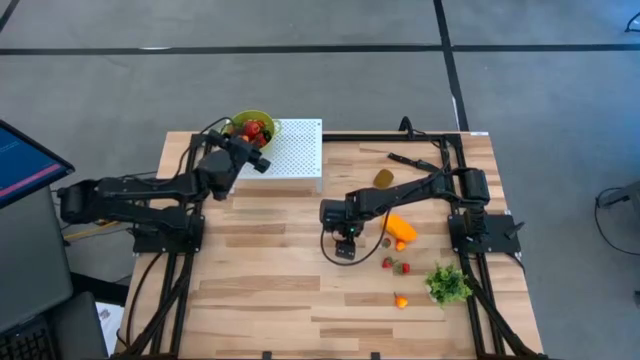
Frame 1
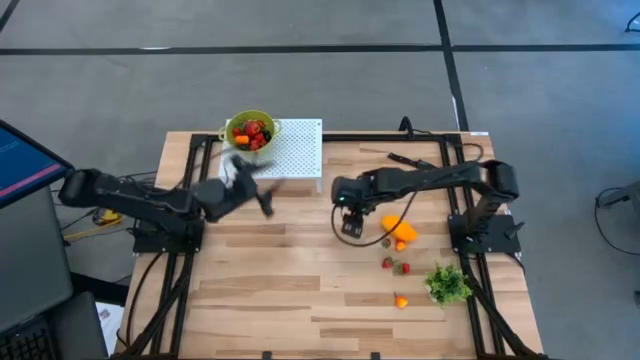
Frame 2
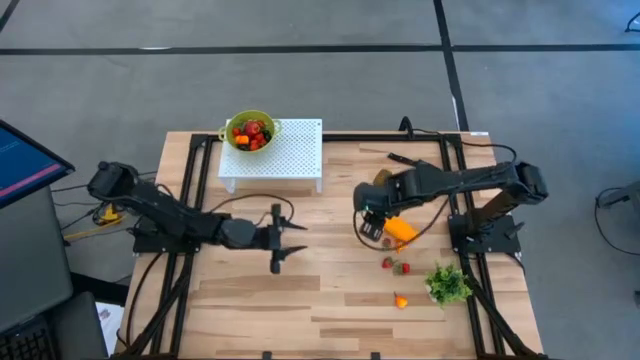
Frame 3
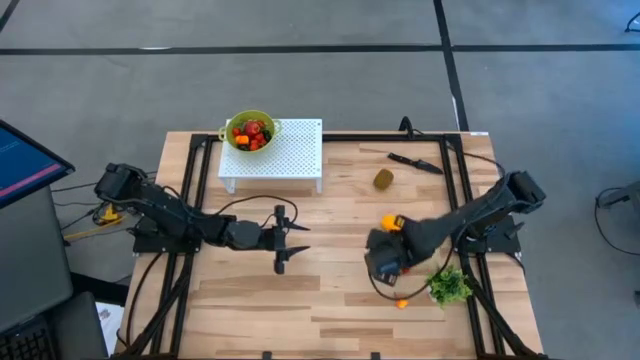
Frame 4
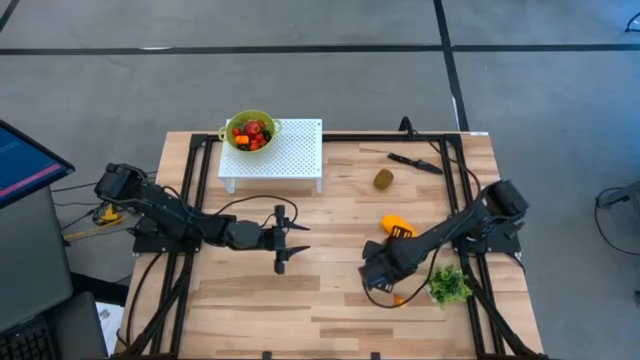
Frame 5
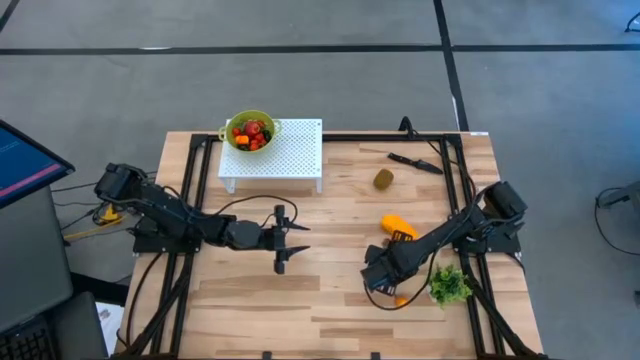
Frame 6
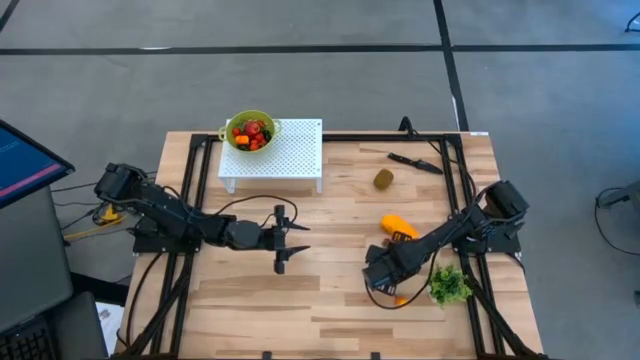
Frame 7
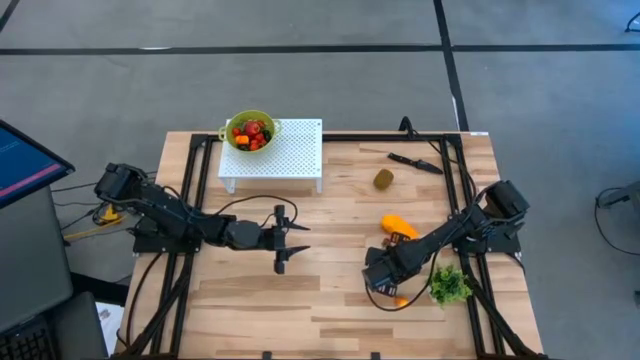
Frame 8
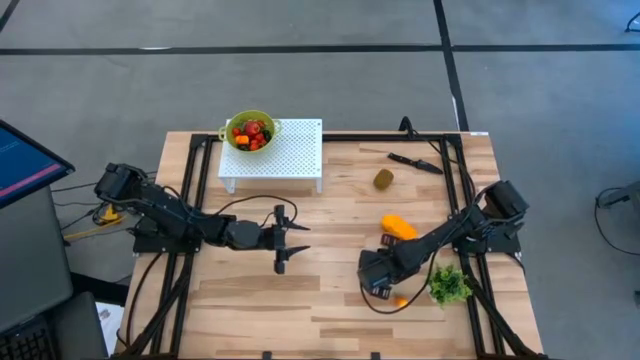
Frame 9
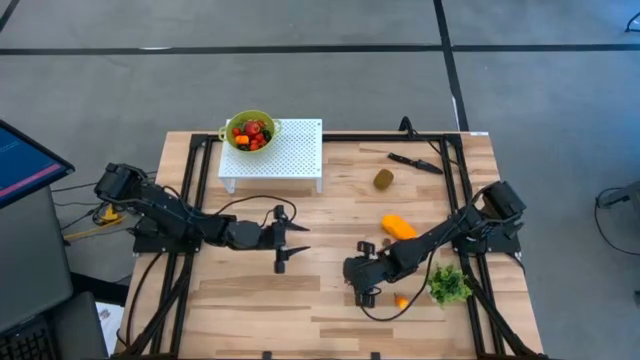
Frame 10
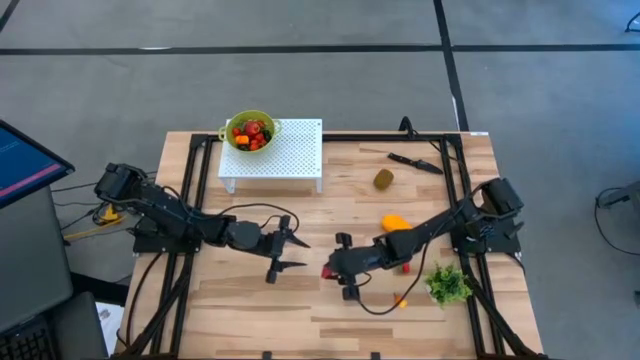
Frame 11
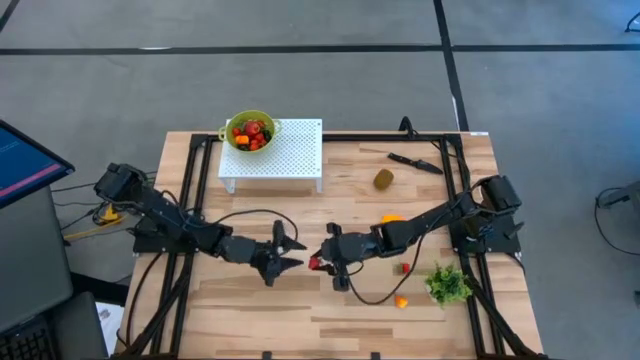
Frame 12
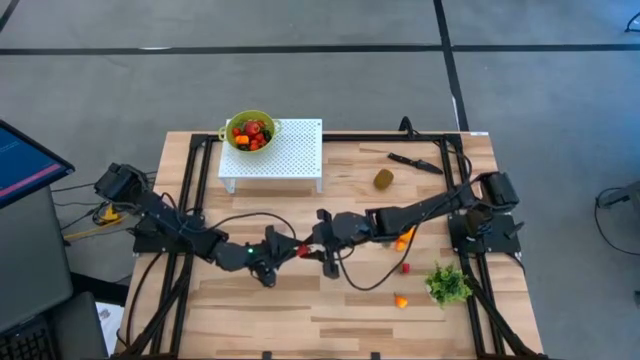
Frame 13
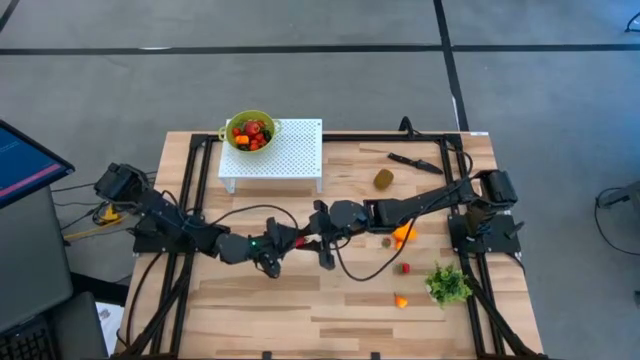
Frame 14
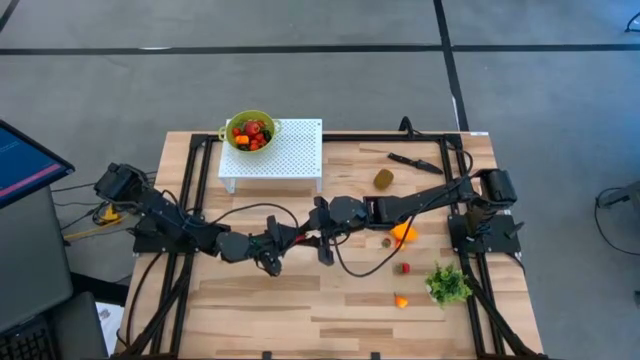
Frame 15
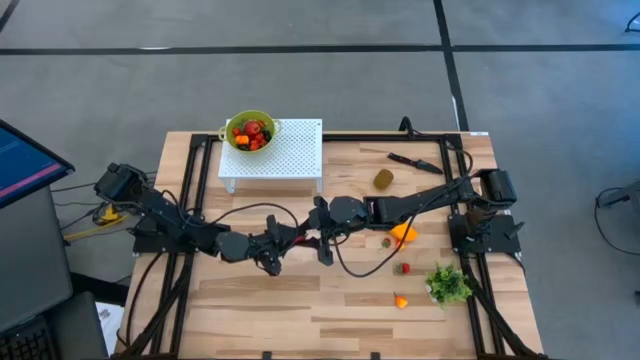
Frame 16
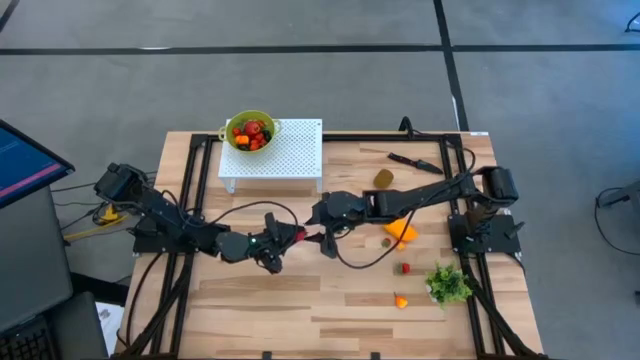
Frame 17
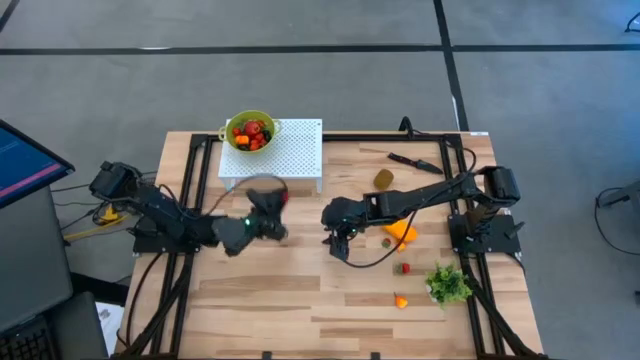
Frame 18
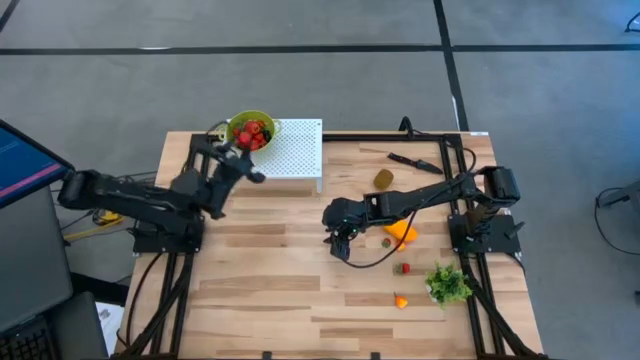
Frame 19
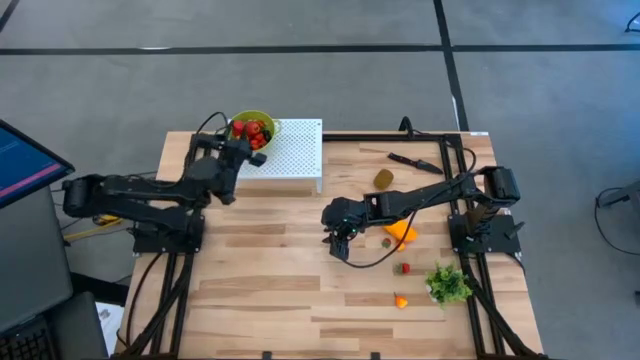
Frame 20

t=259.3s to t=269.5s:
Task: Pick & Place Fruit
Put the strawberry into the green strainer bowl on the shelf

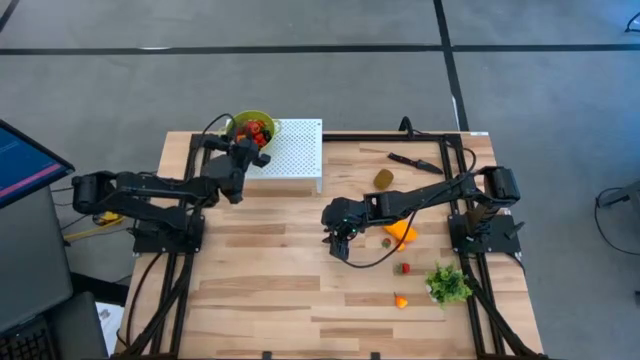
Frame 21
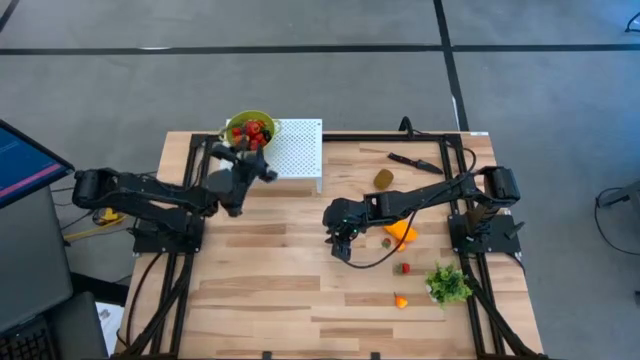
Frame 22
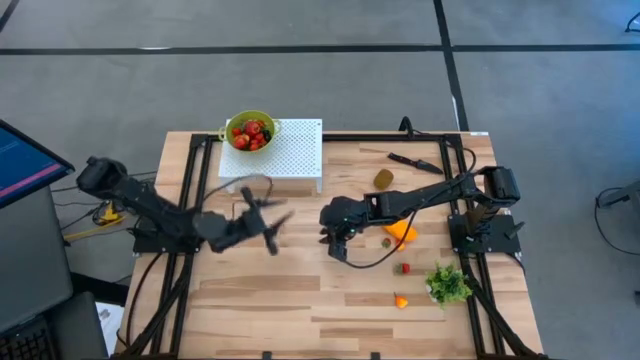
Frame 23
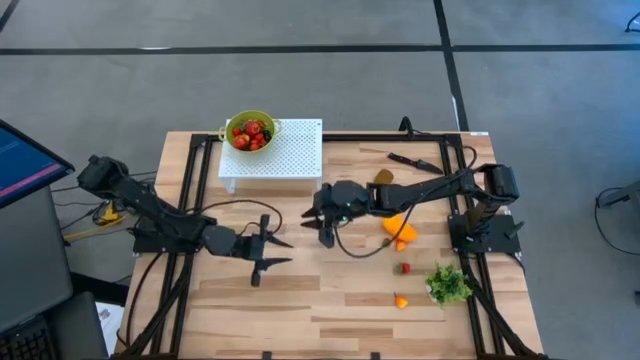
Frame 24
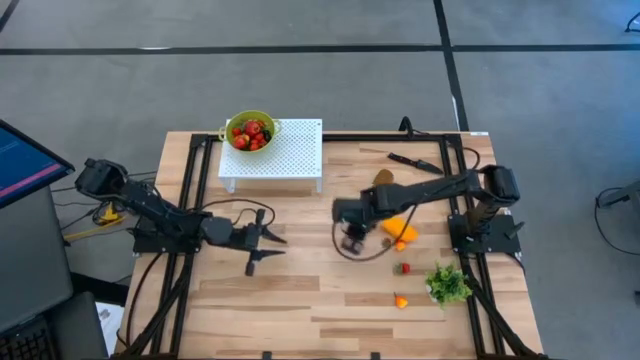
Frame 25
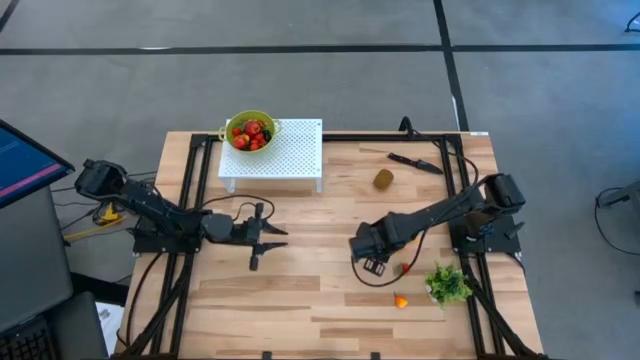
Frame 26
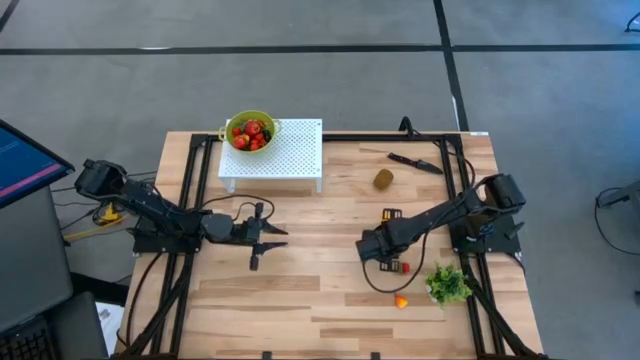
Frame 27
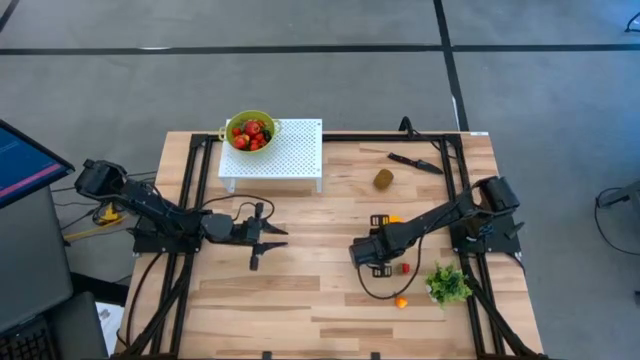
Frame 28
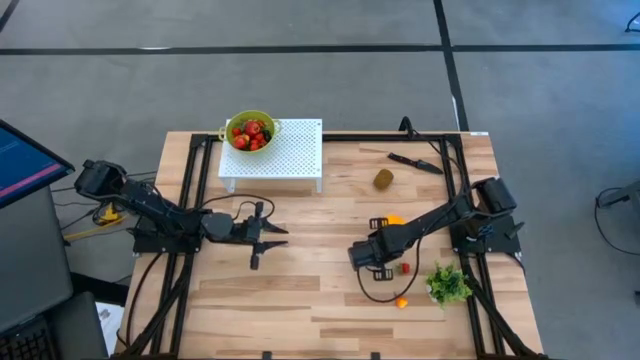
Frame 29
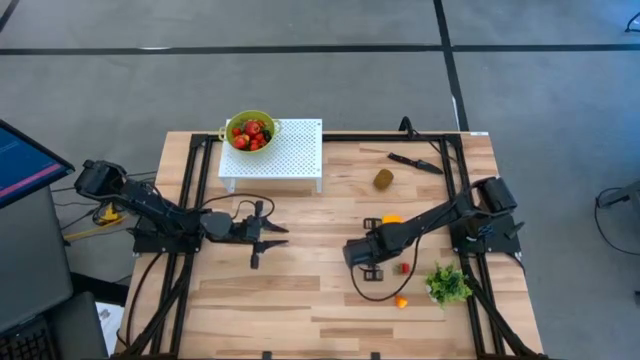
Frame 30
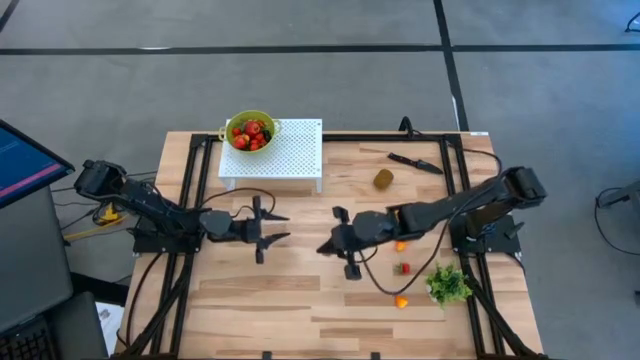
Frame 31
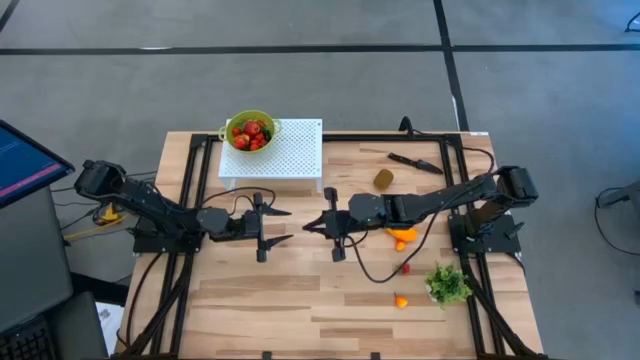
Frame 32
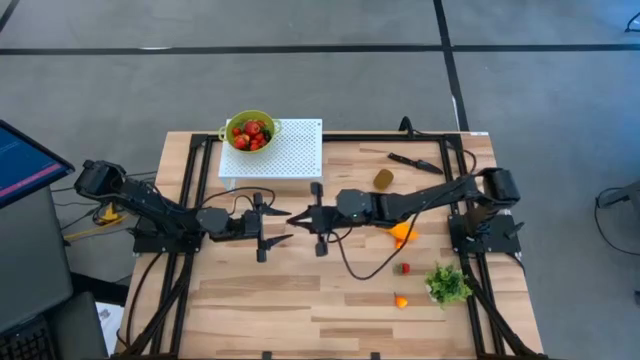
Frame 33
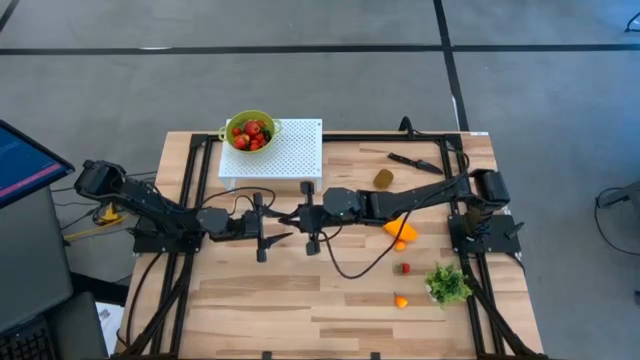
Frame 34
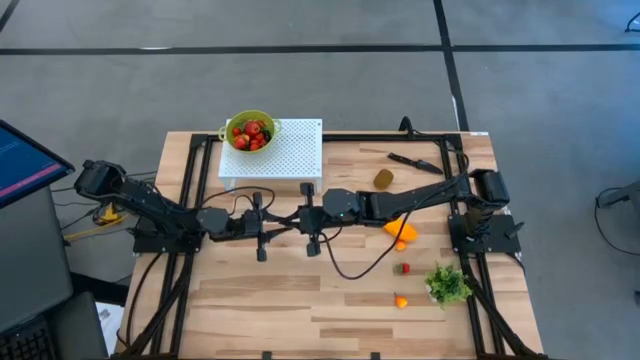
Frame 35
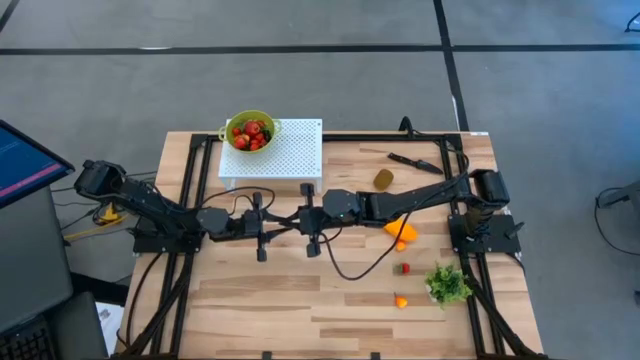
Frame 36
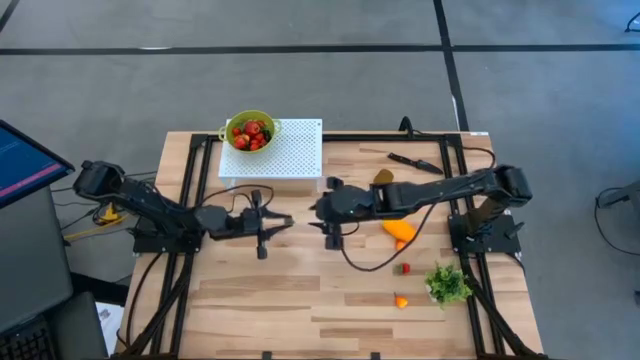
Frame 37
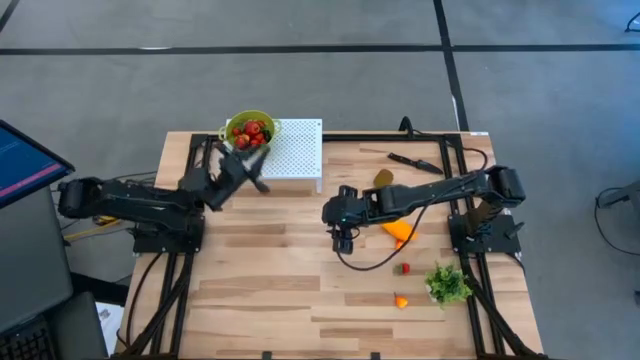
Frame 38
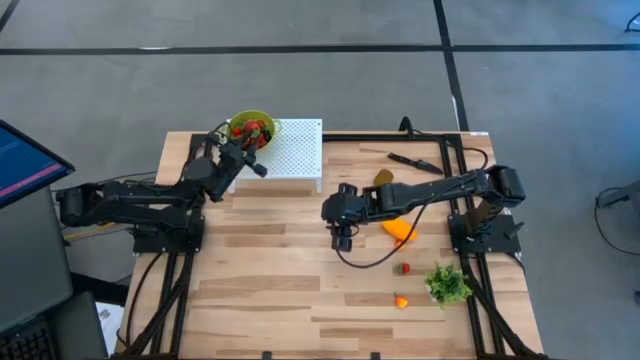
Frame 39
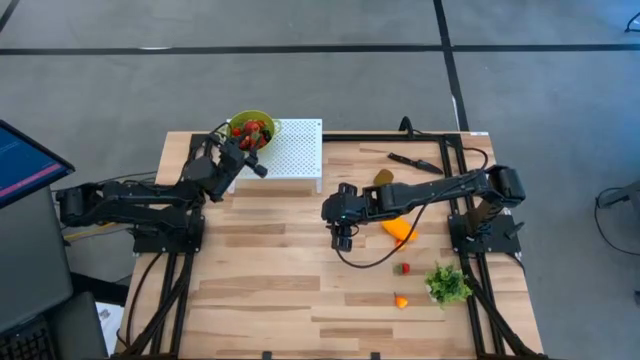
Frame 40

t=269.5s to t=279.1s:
Put the strawberry into the green strainer bowl on the shelf

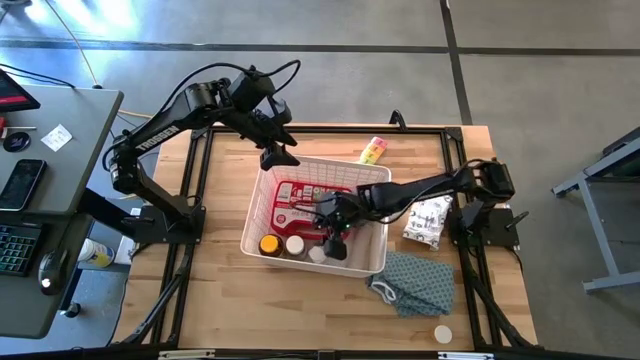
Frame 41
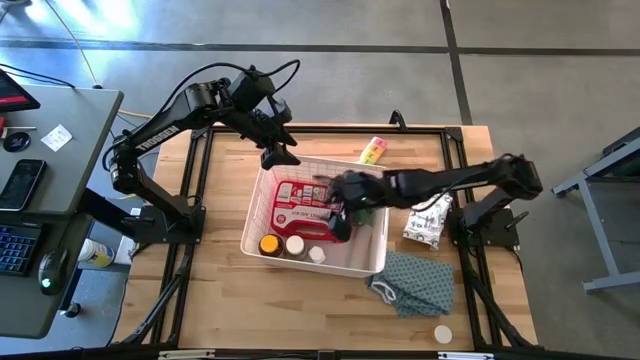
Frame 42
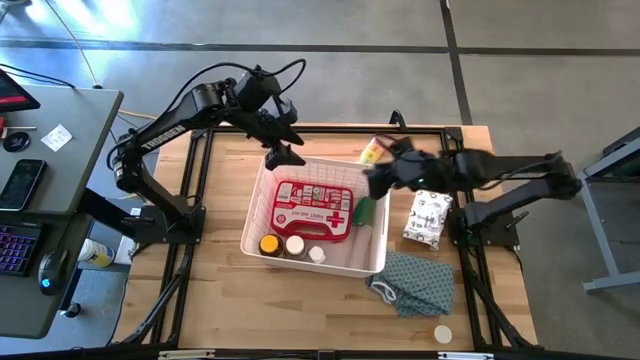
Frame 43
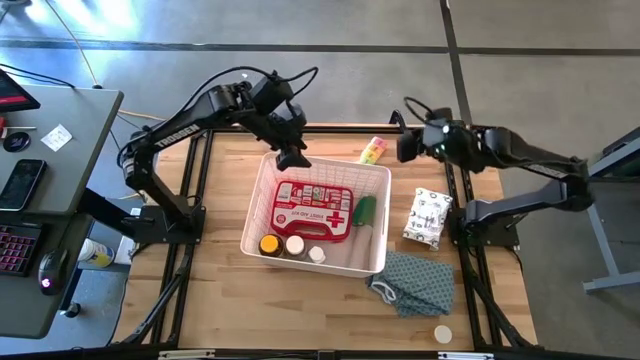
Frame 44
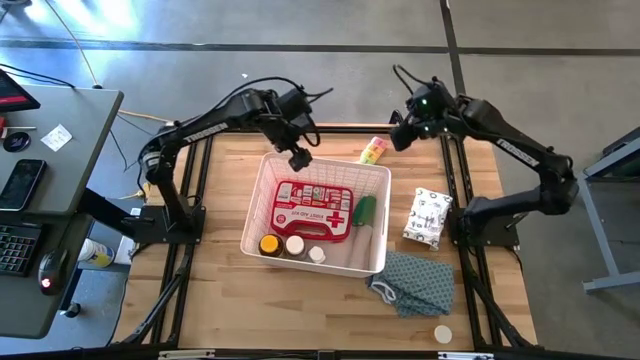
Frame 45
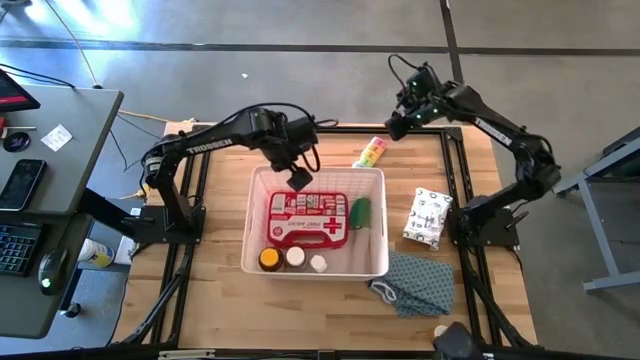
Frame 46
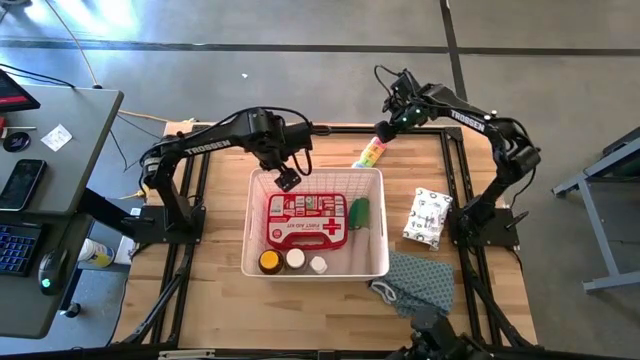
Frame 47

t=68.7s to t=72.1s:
Task: Pick & place medical supplies in basket/bin
Adjust the white container
